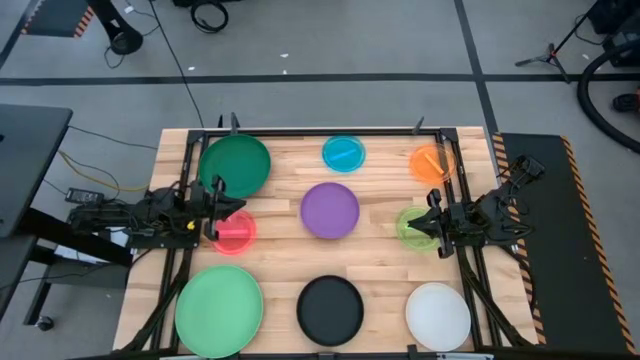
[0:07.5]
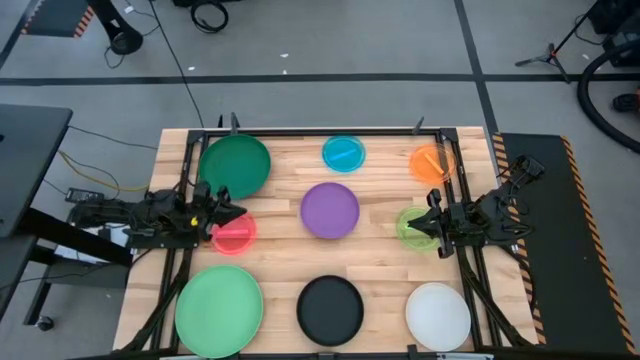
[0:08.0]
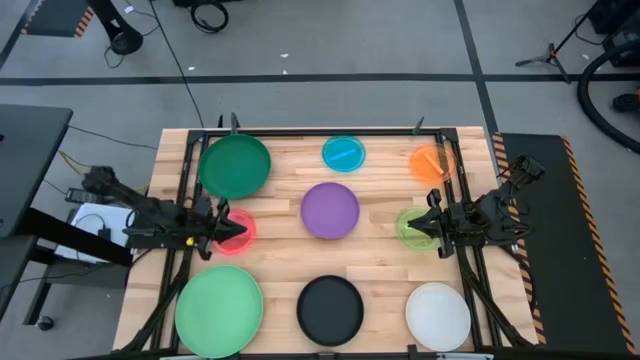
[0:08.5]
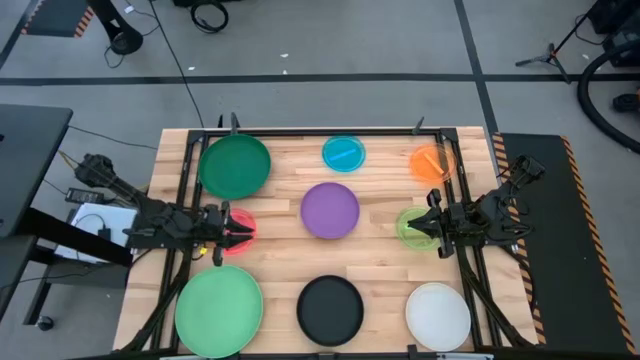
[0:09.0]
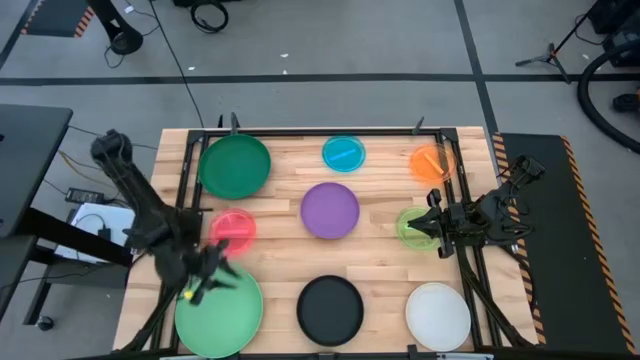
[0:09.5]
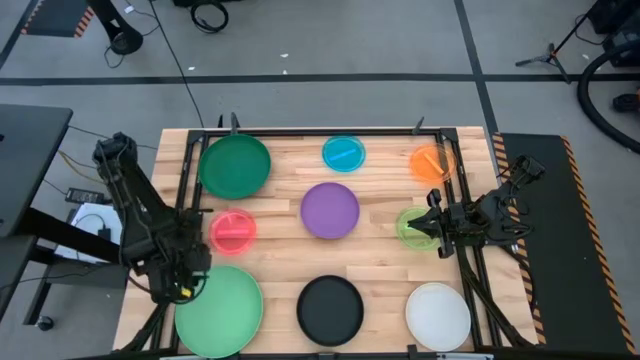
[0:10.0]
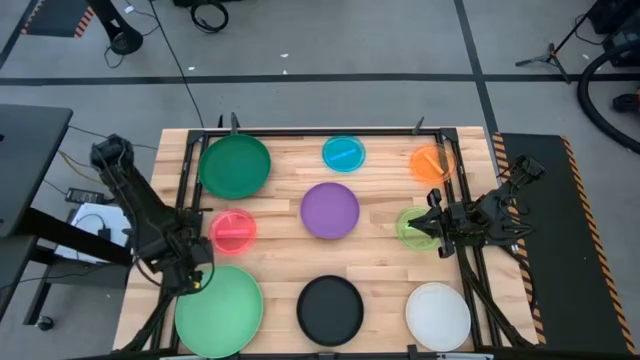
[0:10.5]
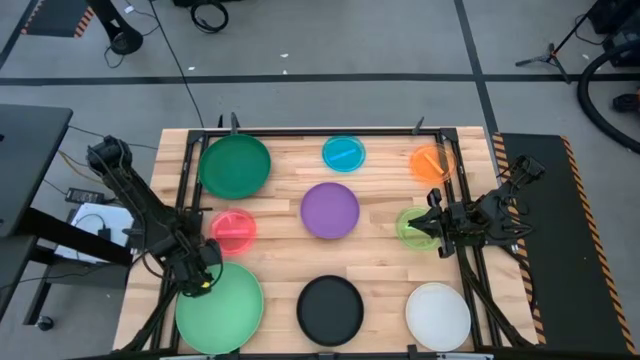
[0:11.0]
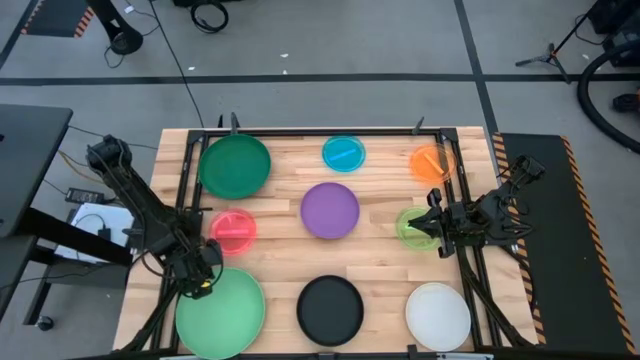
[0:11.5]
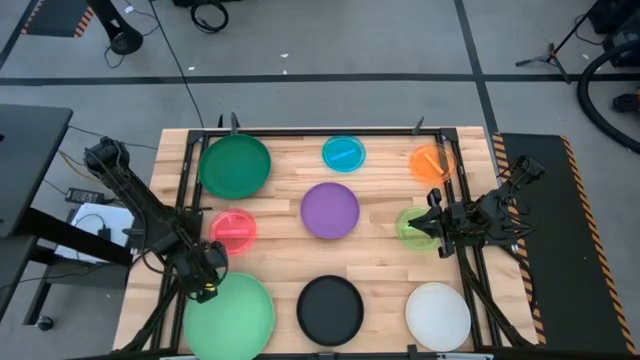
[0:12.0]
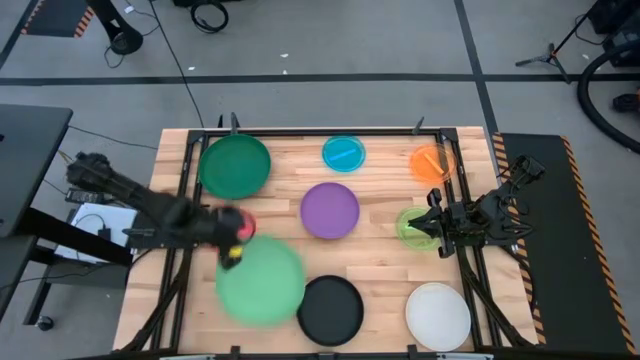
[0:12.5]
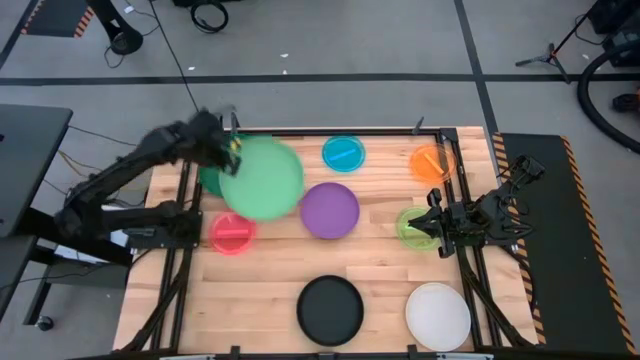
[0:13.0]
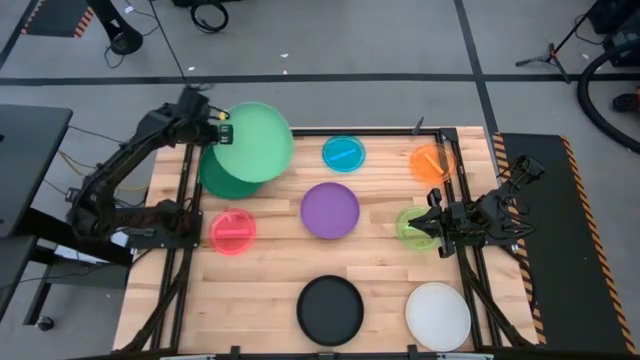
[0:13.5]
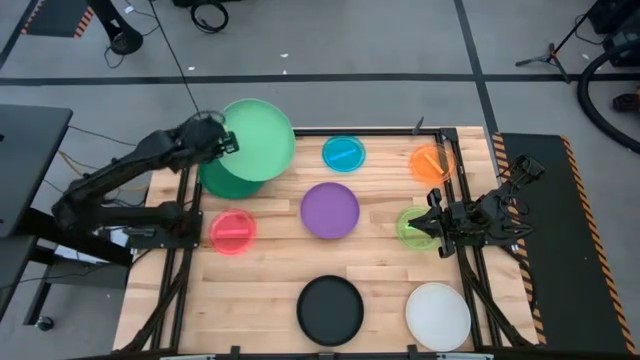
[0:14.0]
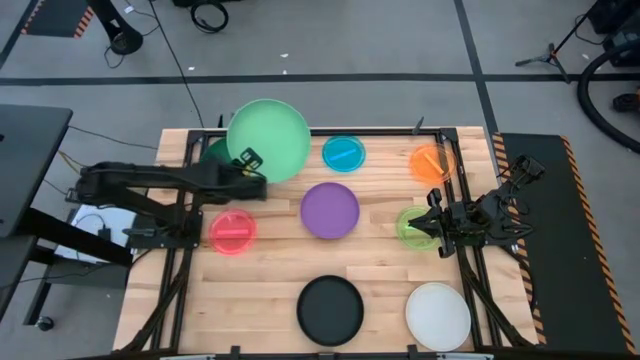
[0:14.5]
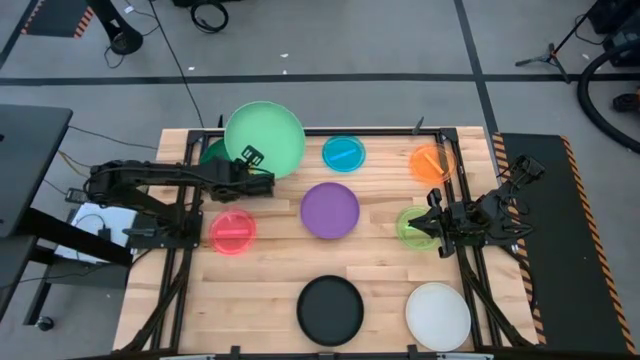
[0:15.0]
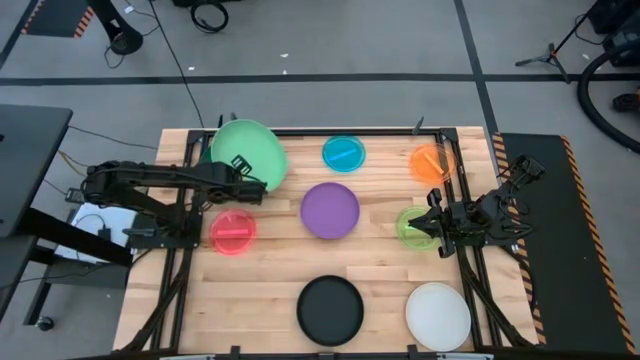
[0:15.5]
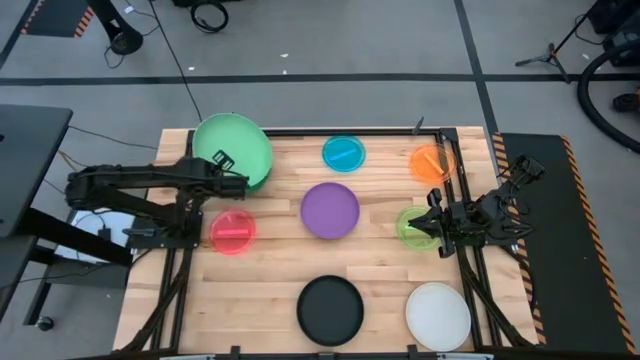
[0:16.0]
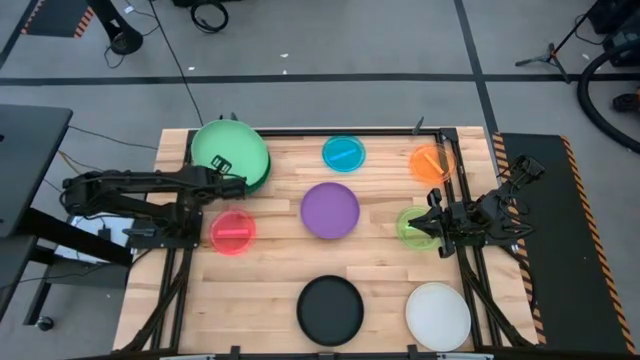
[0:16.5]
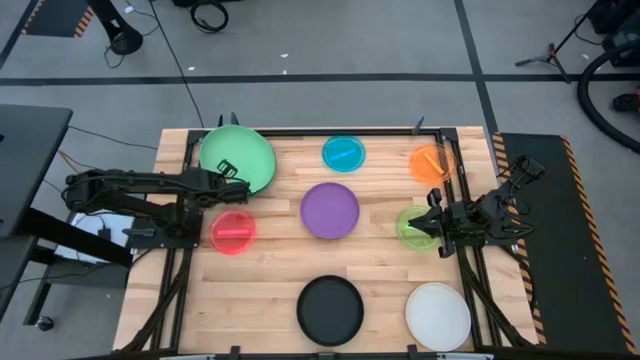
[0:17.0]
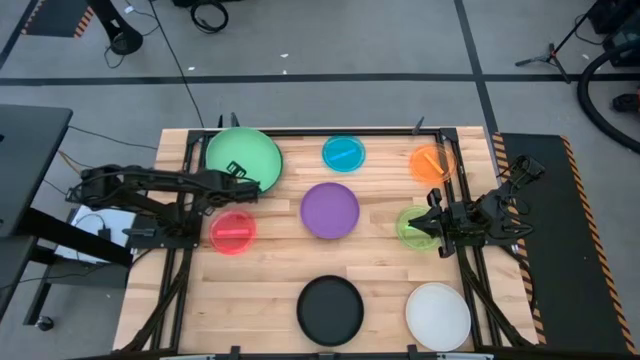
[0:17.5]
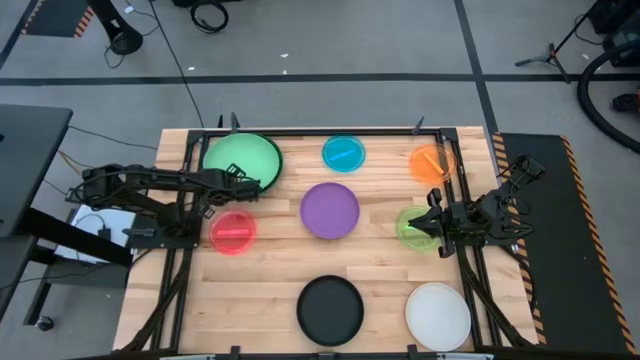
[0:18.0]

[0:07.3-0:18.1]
Task: Stack plastic plates
Stack the green plate on top of the dark green plate

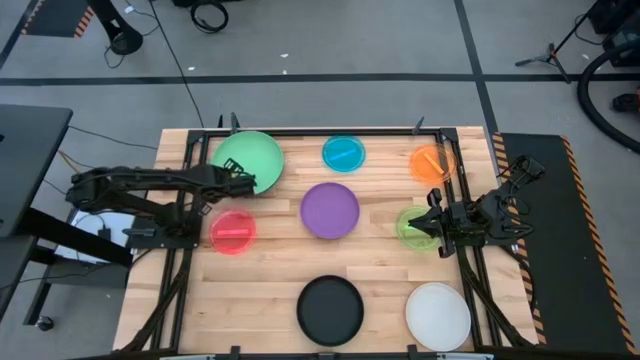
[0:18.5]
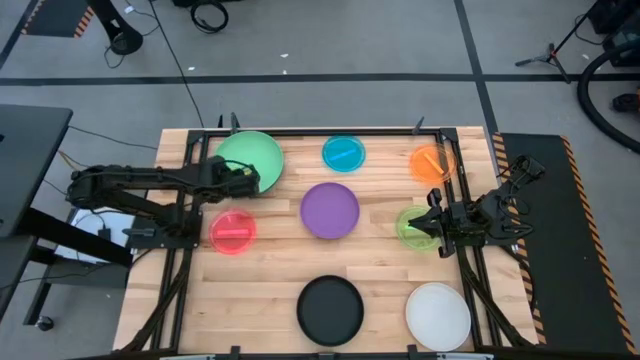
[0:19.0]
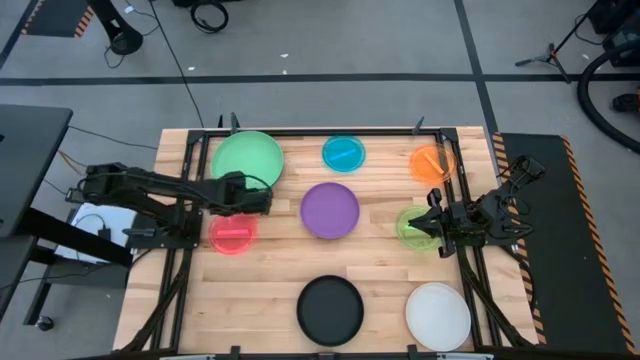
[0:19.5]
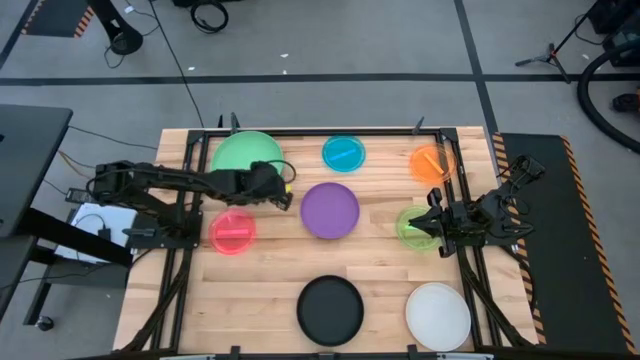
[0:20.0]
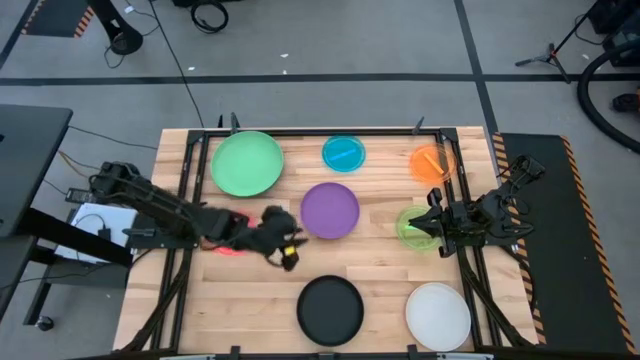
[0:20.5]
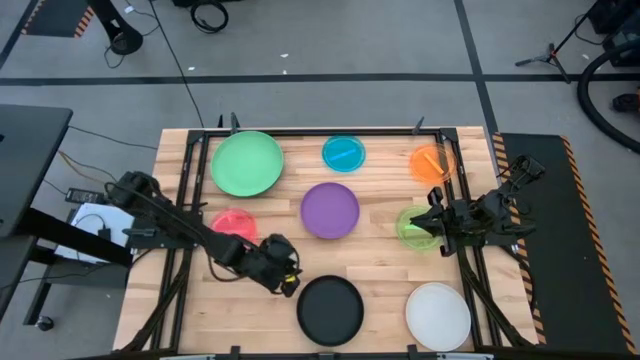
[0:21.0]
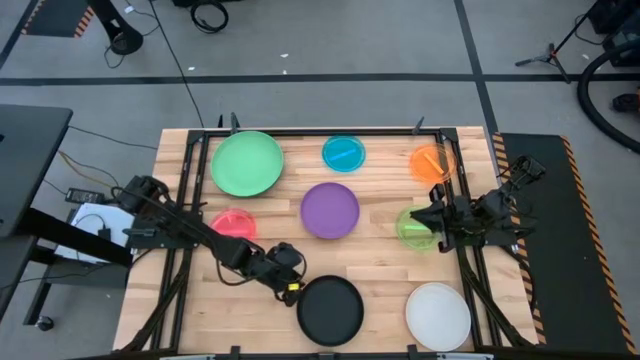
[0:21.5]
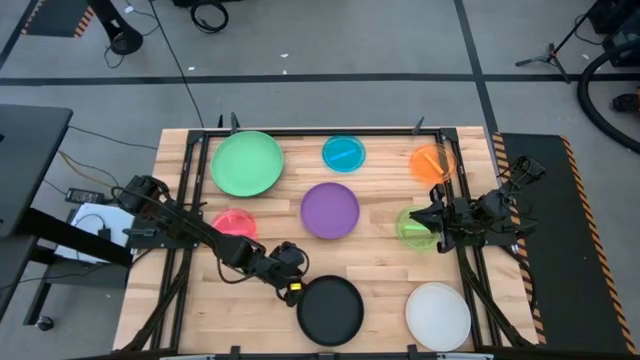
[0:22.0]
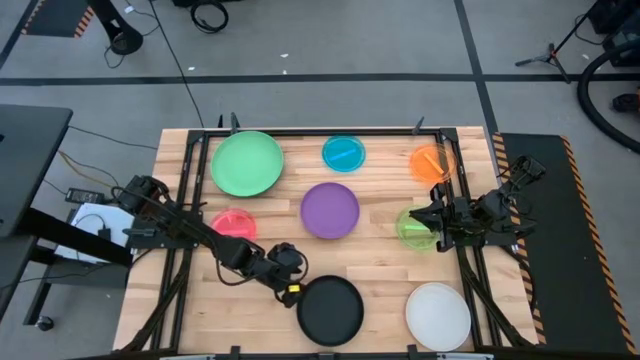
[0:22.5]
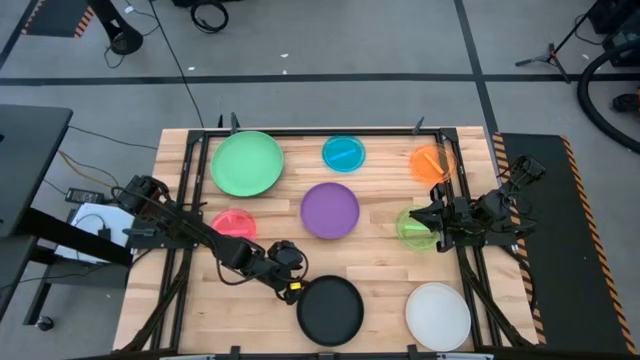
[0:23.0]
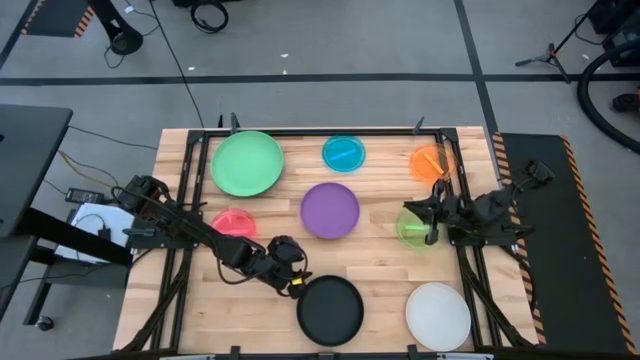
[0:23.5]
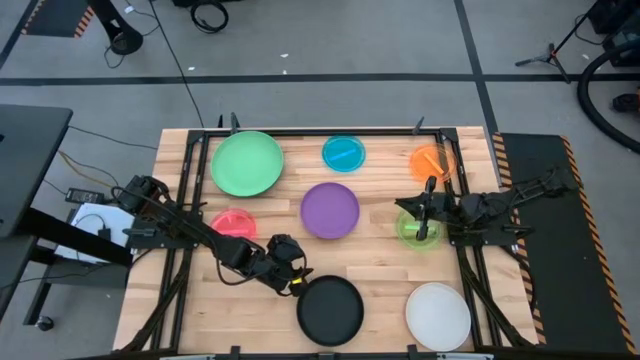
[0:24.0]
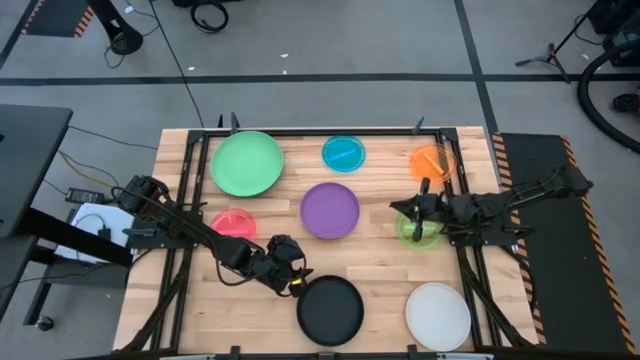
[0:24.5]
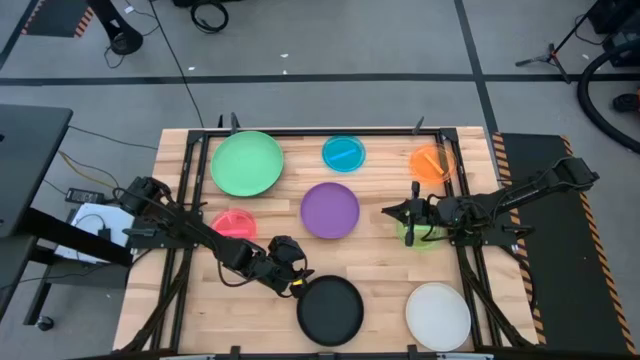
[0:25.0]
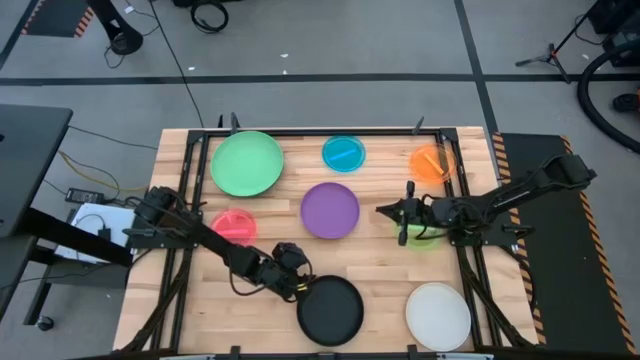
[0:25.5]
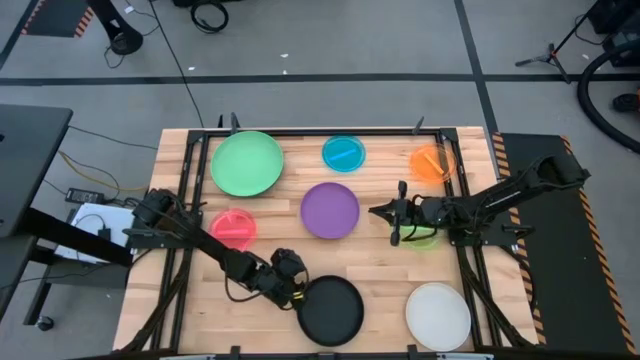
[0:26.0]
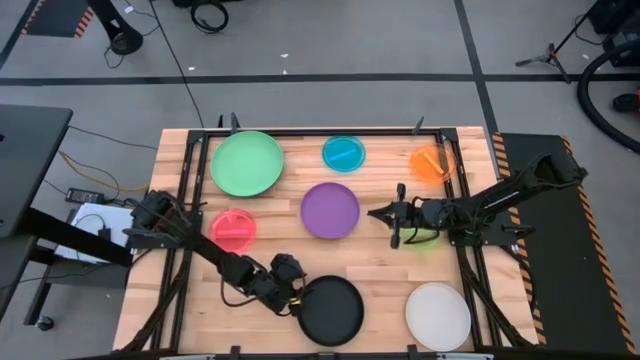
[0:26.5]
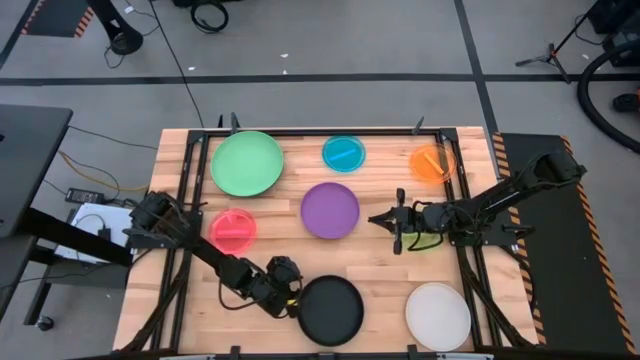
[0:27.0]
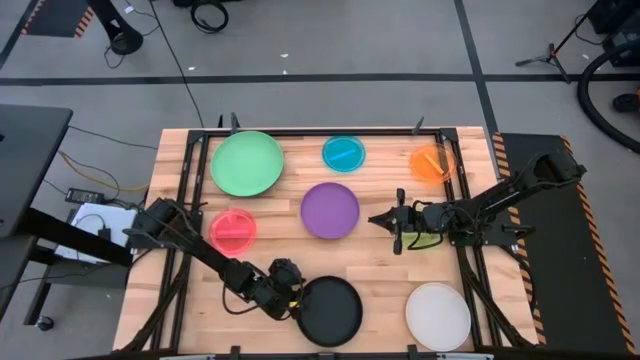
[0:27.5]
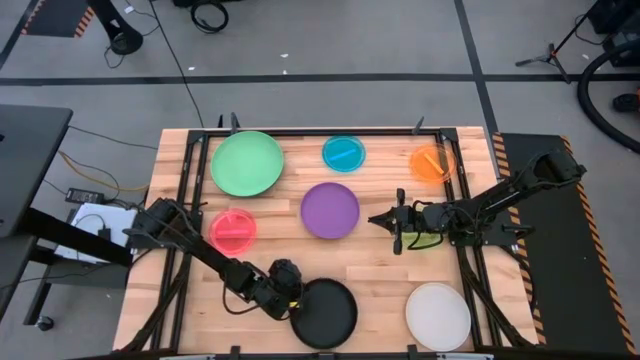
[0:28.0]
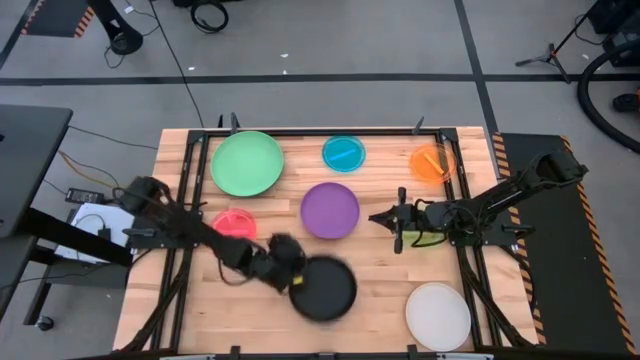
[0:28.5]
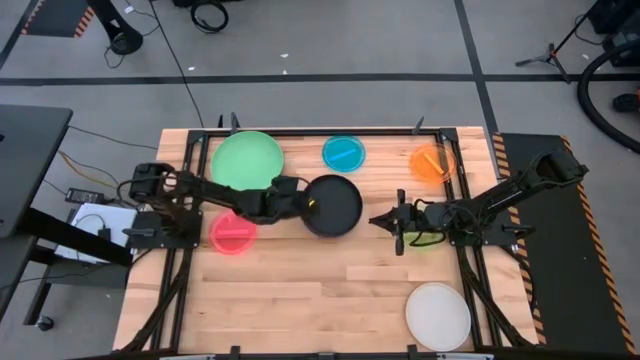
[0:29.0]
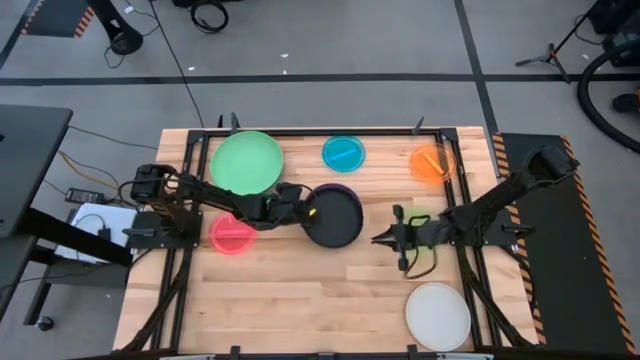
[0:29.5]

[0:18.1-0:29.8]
Stack the black plate on top of the violet plate
